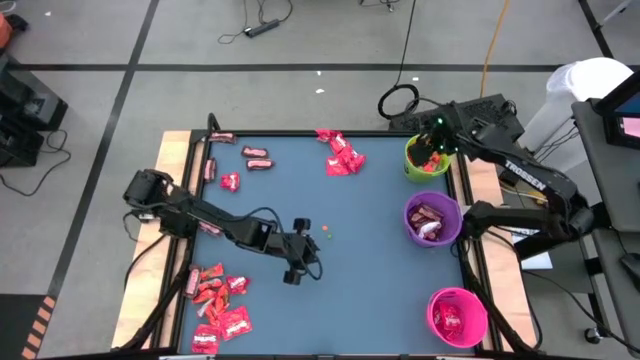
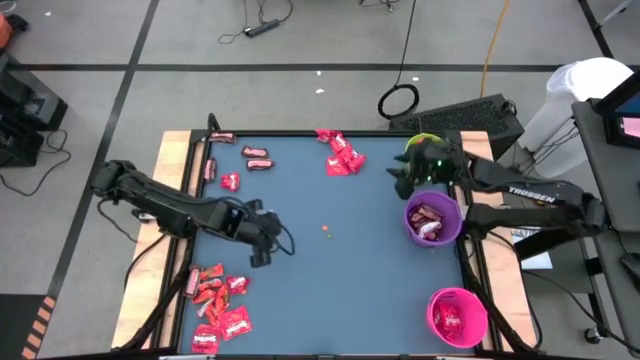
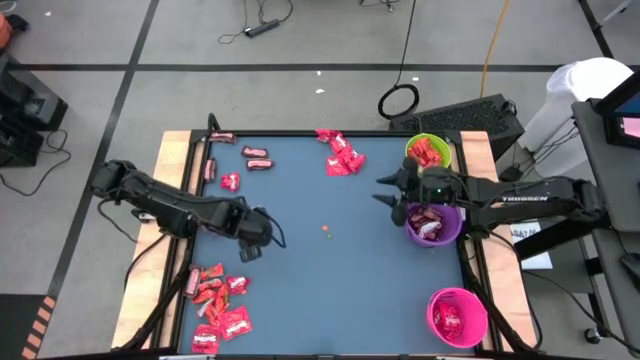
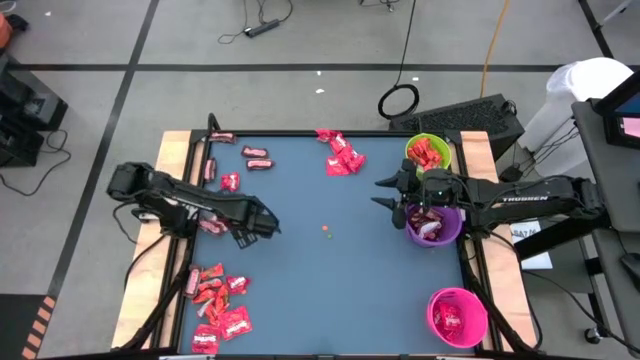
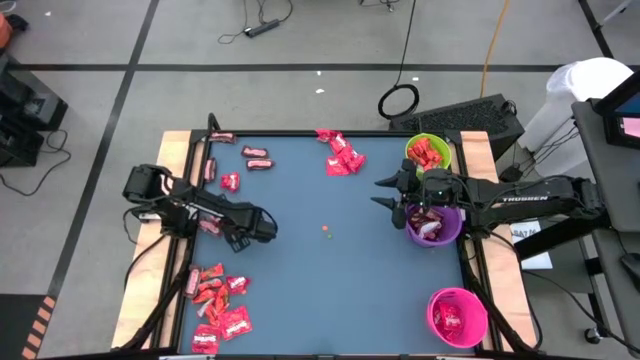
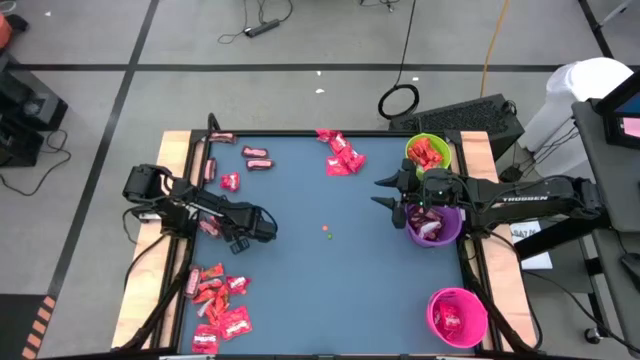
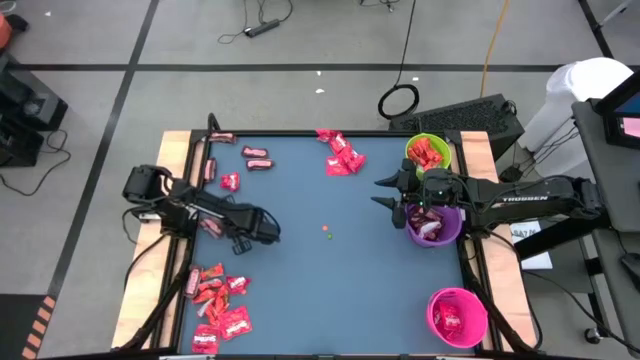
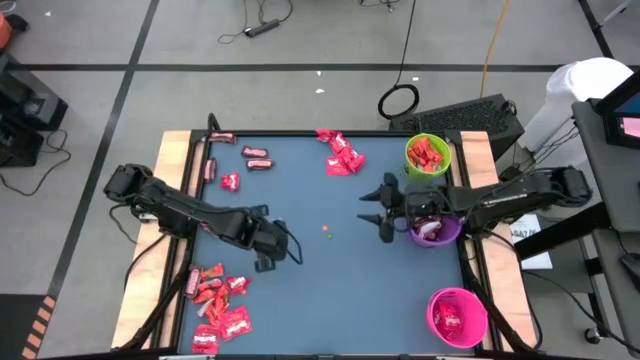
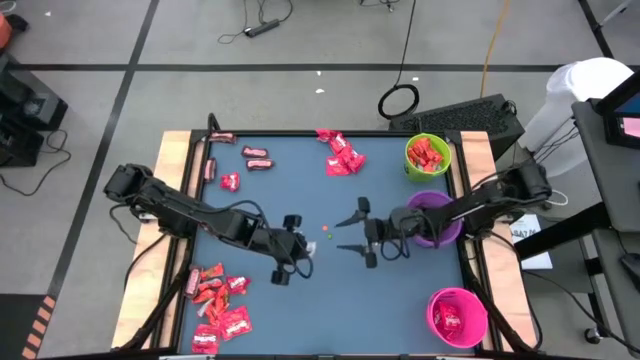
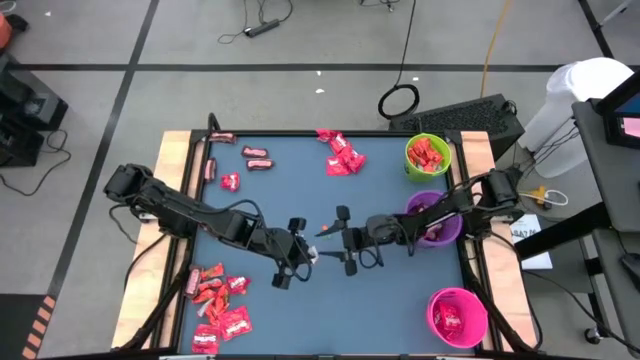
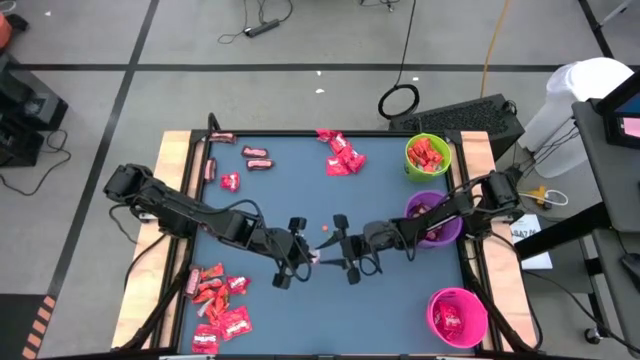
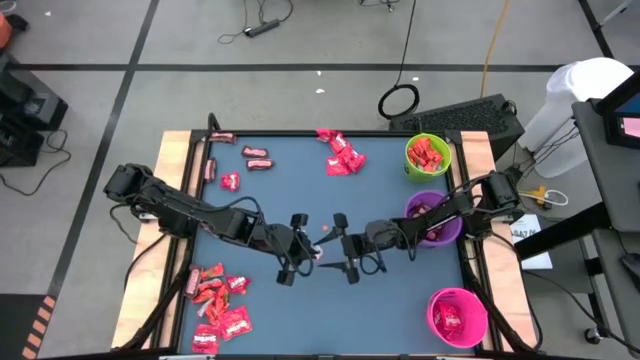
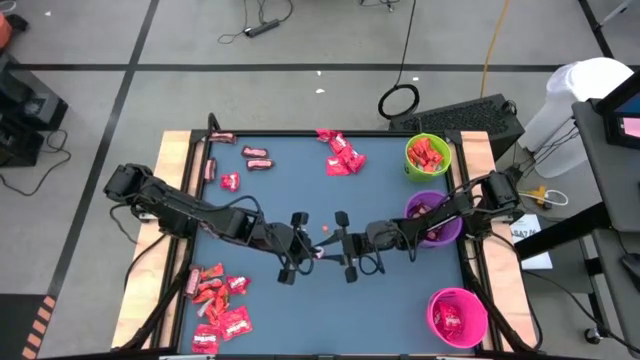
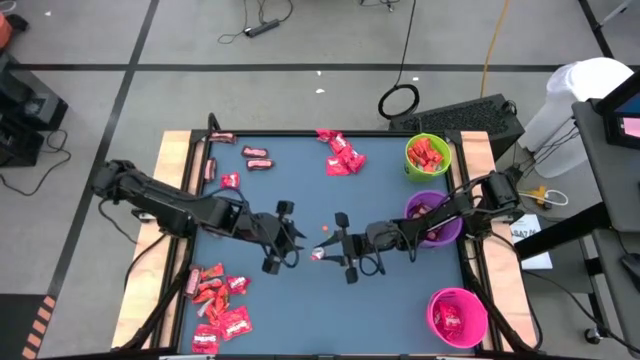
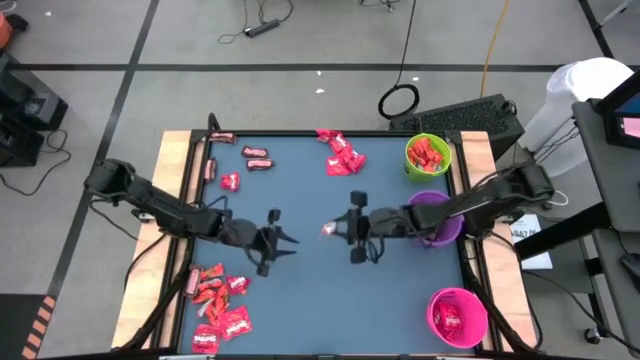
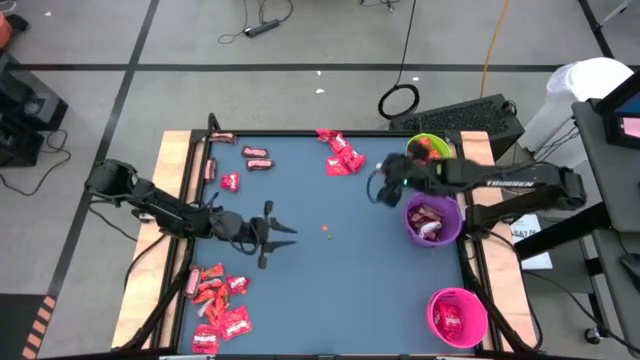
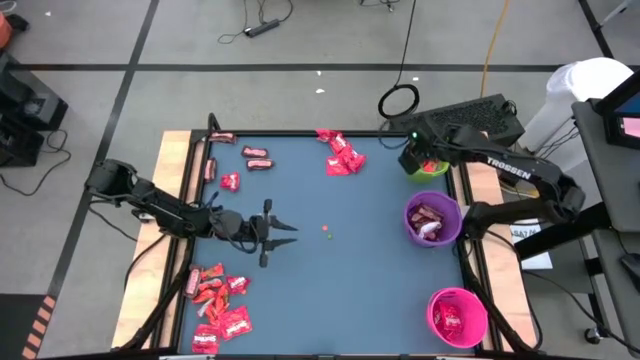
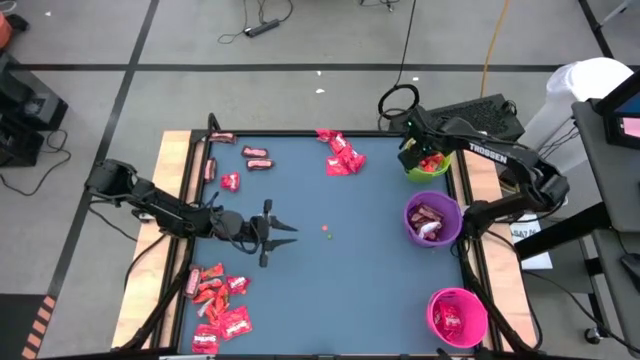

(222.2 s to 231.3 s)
Task: Organize candy in baskets
Put the orange chocolate bar into the green bucket

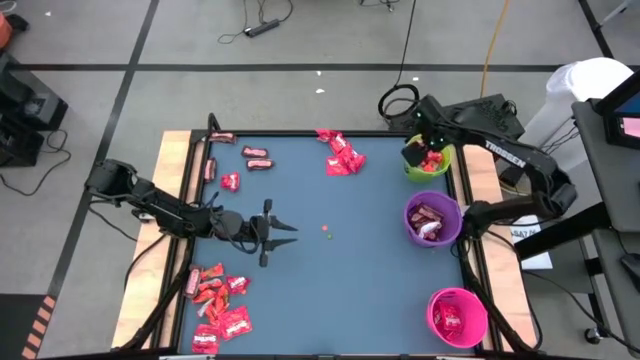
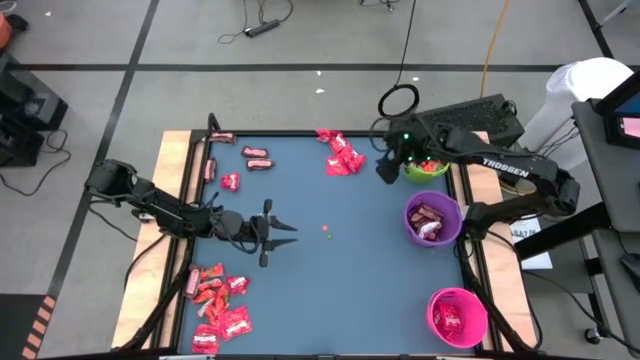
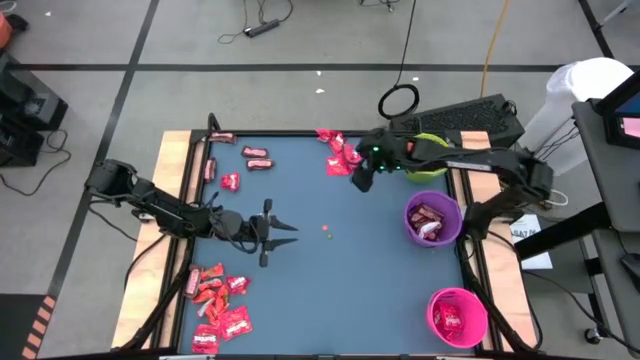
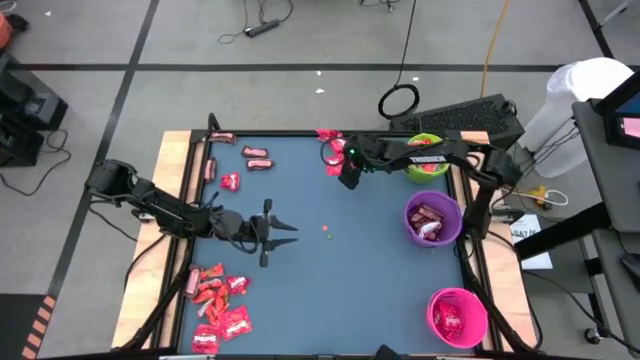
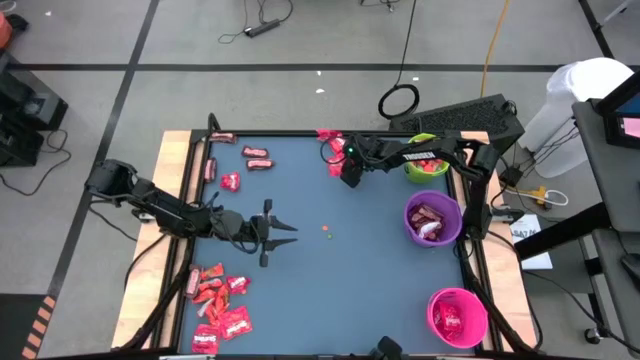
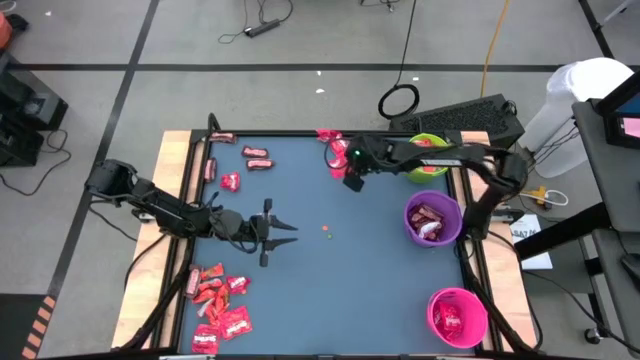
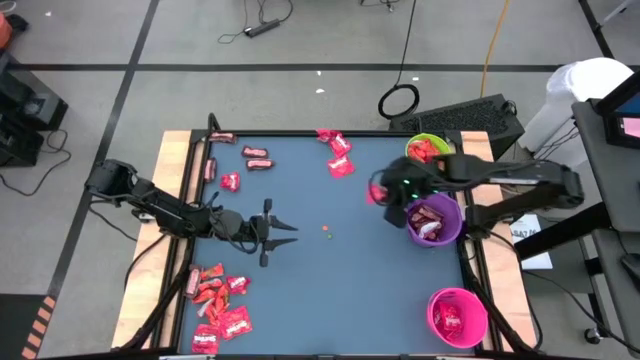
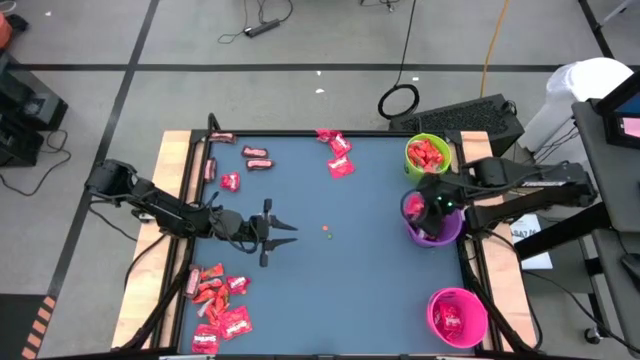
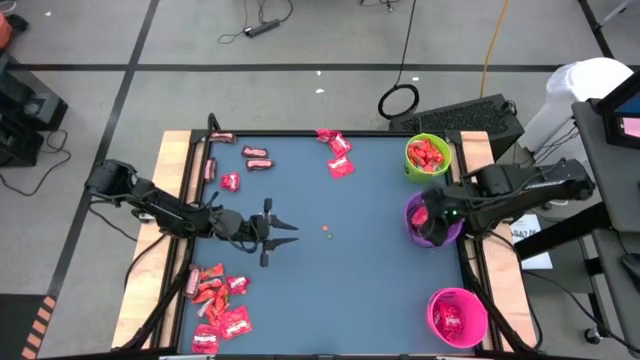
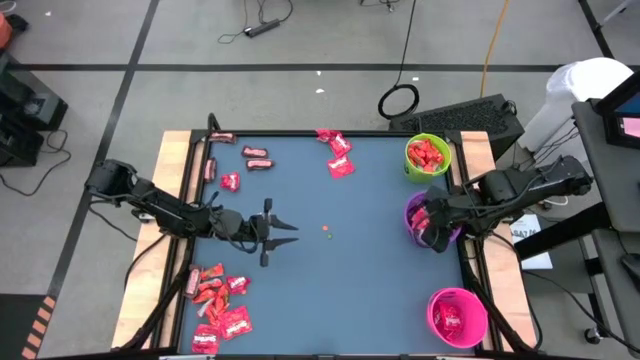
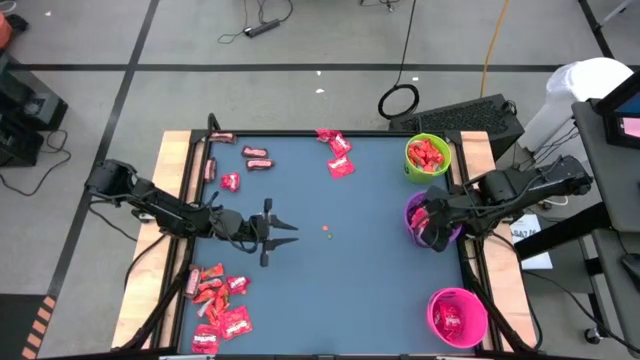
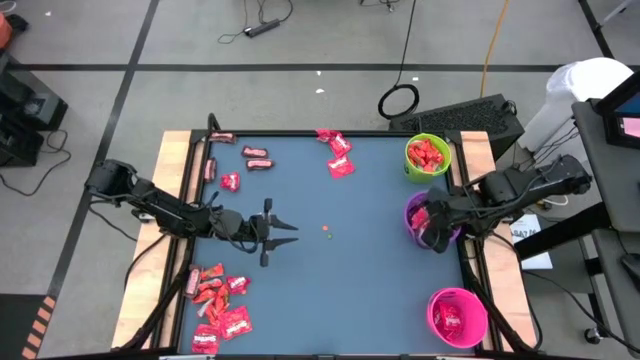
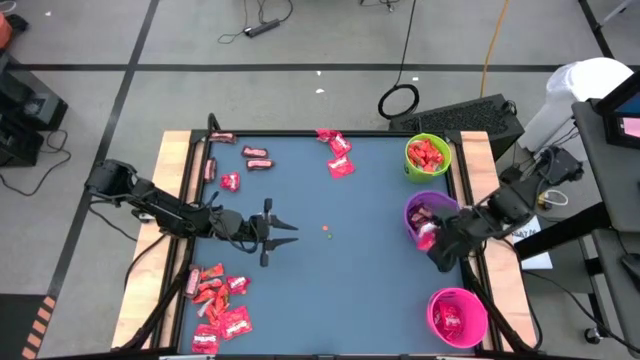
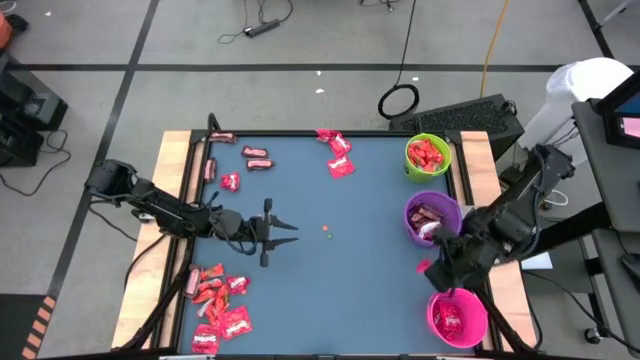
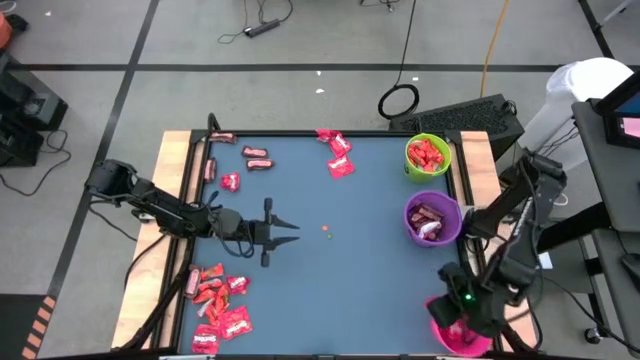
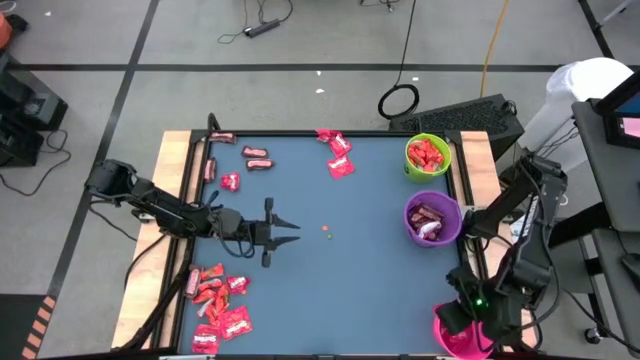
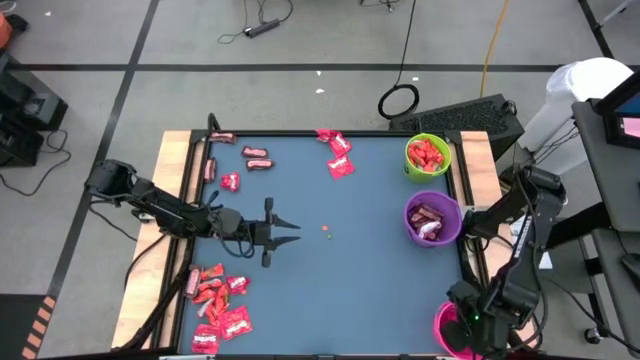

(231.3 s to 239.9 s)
Put the red candy pack into the pink bucket

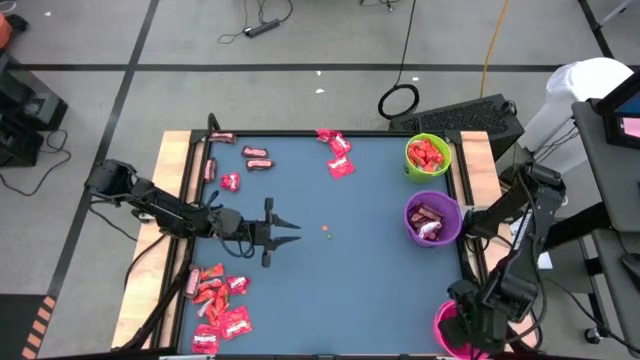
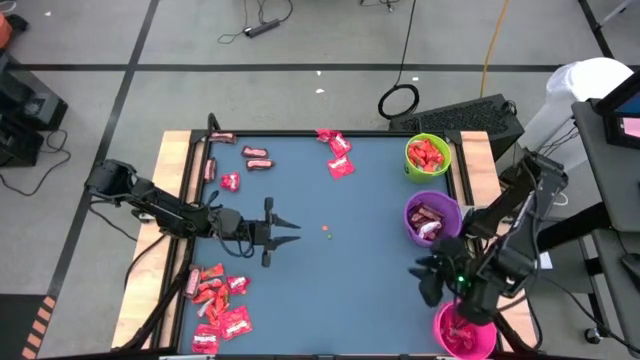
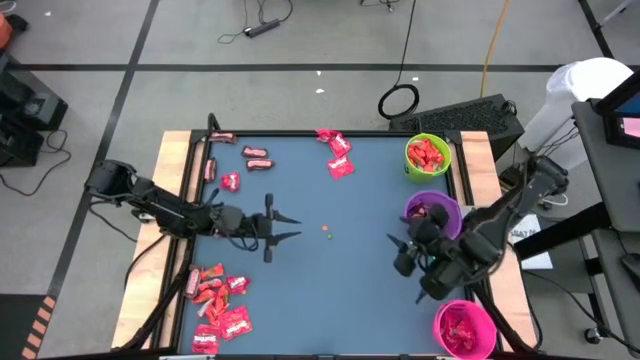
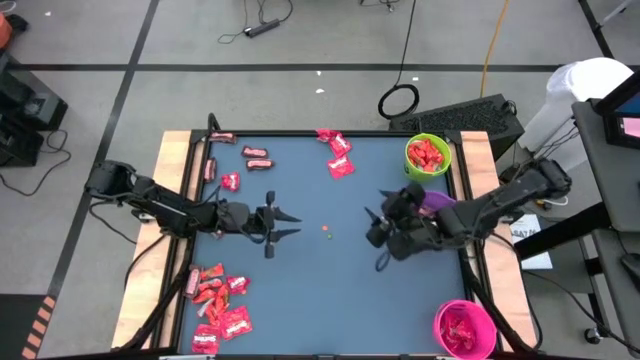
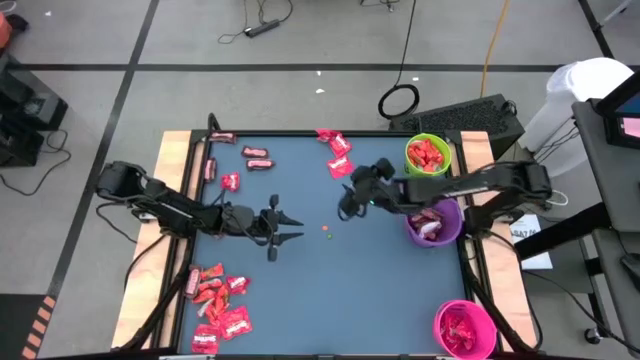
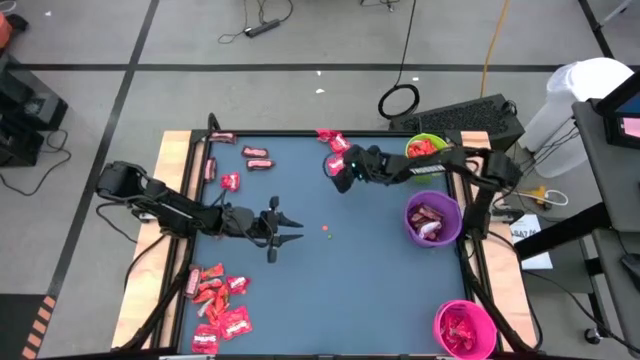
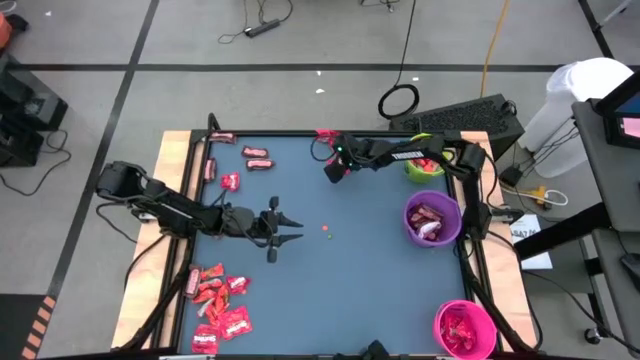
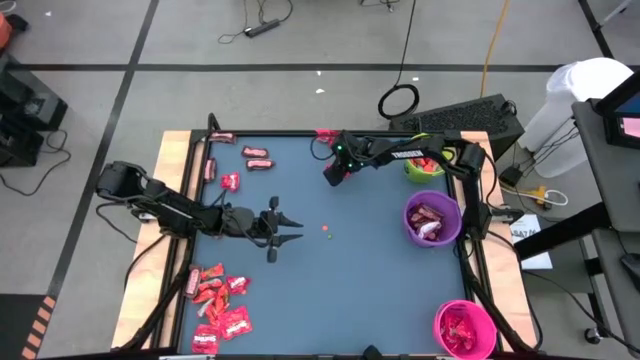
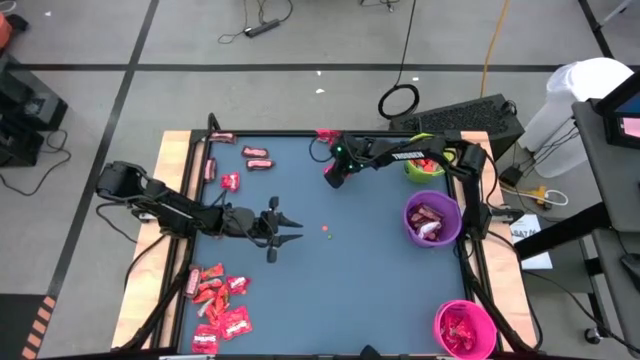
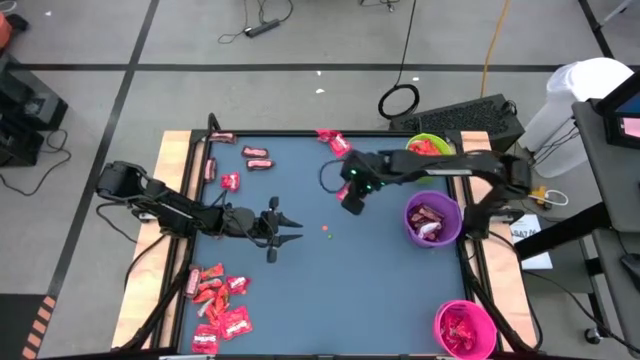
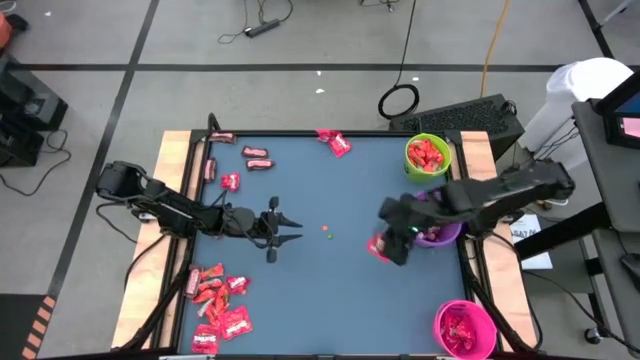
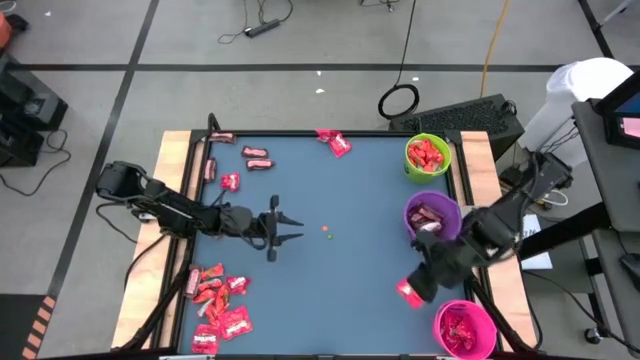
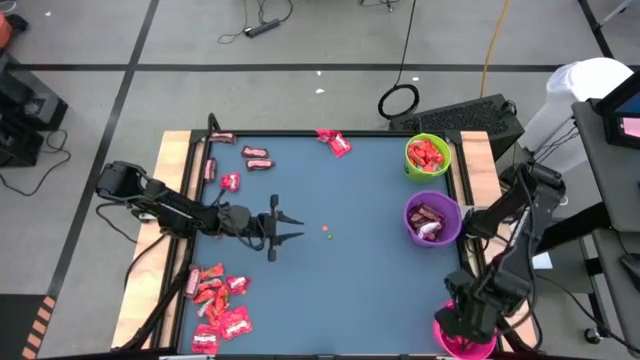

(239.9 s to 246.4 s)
Put the red candy pack into the pink bucket
